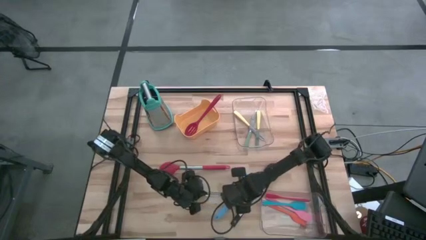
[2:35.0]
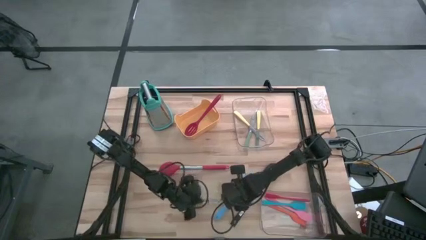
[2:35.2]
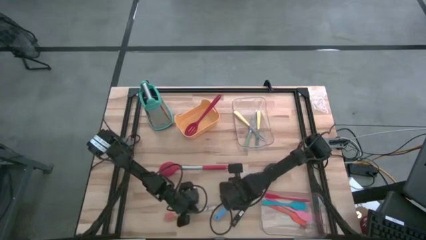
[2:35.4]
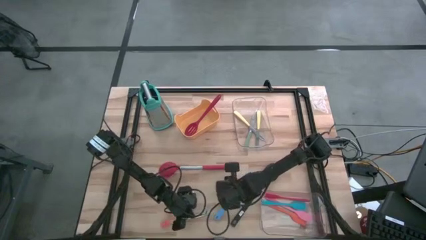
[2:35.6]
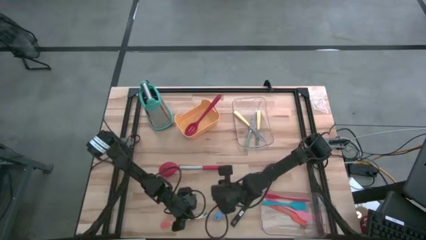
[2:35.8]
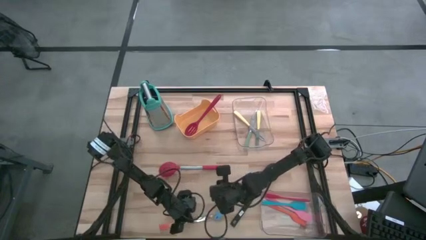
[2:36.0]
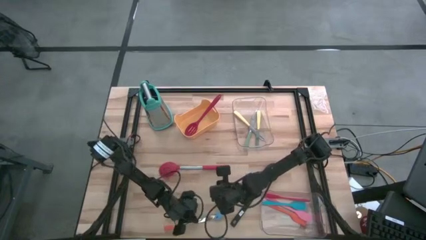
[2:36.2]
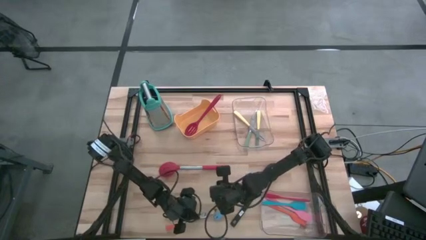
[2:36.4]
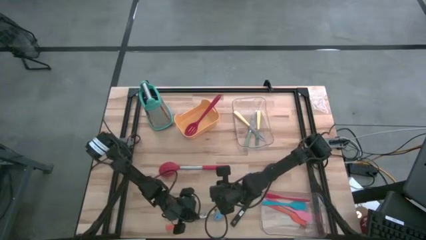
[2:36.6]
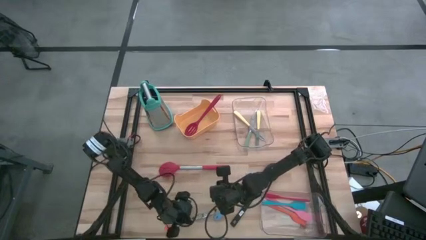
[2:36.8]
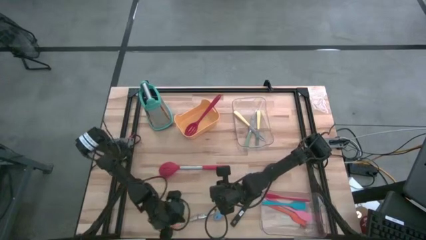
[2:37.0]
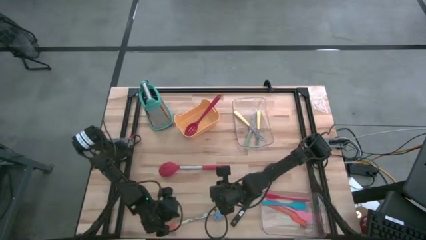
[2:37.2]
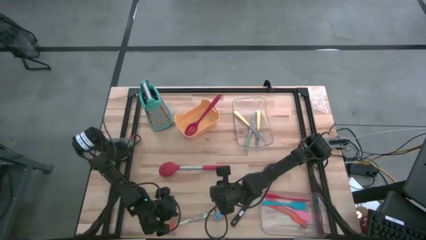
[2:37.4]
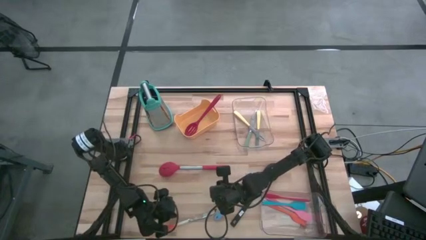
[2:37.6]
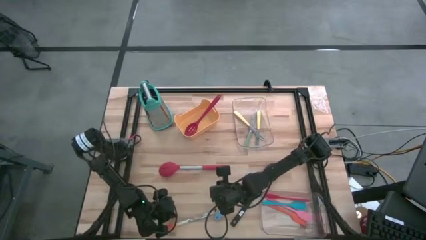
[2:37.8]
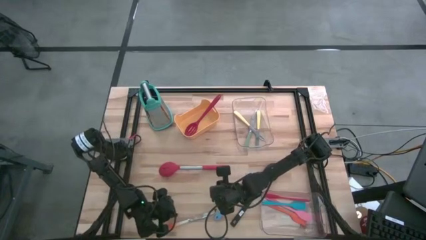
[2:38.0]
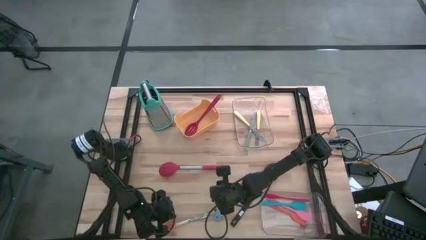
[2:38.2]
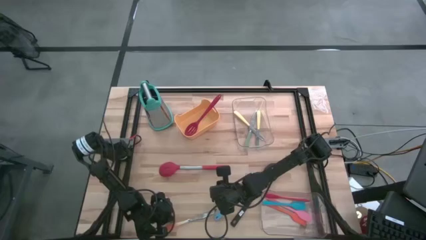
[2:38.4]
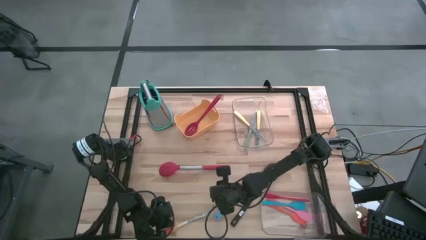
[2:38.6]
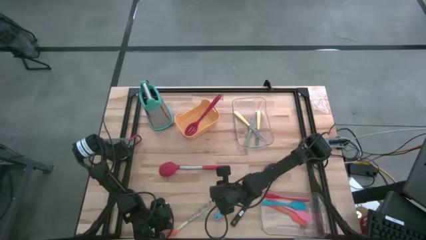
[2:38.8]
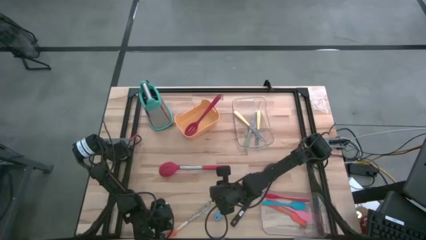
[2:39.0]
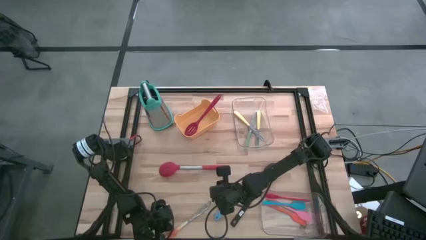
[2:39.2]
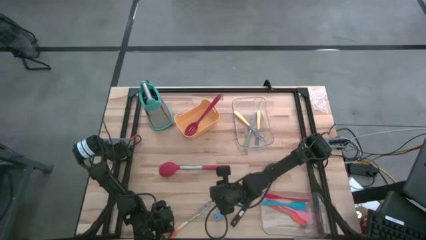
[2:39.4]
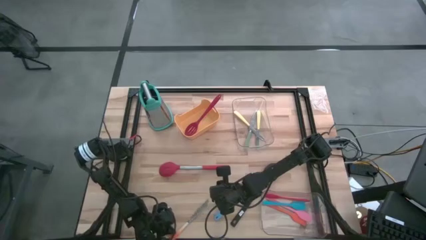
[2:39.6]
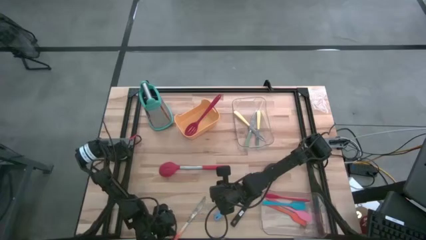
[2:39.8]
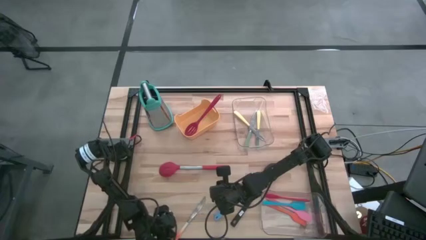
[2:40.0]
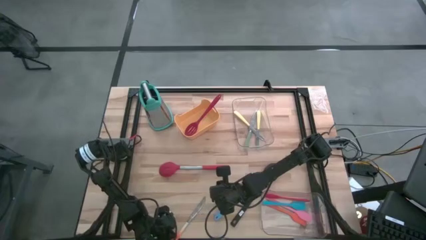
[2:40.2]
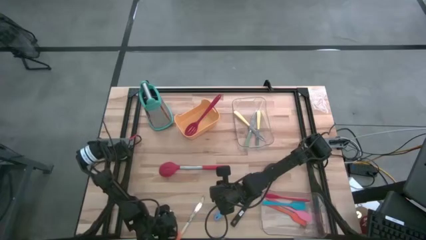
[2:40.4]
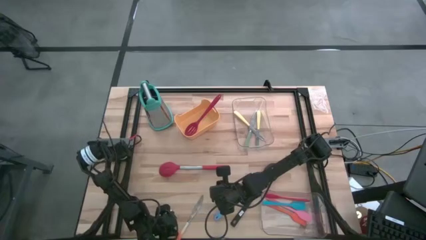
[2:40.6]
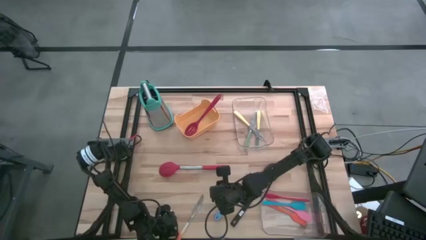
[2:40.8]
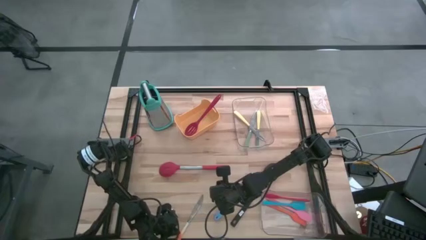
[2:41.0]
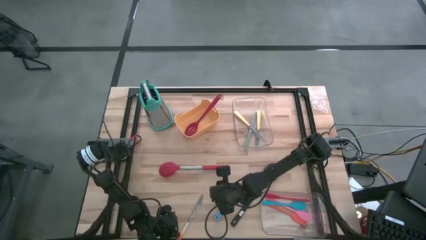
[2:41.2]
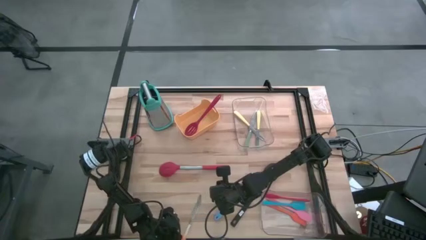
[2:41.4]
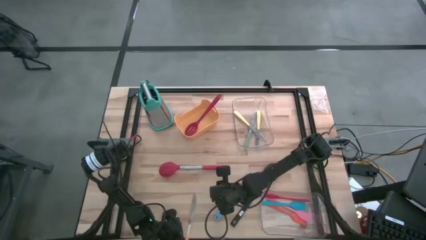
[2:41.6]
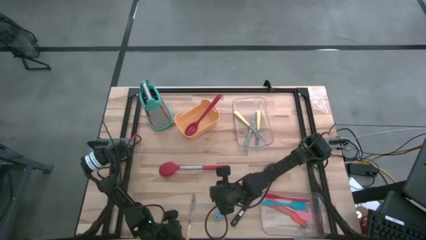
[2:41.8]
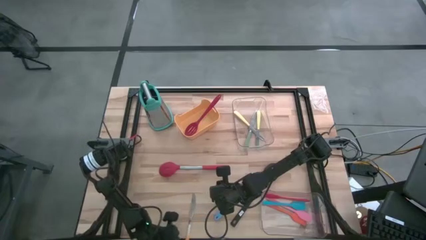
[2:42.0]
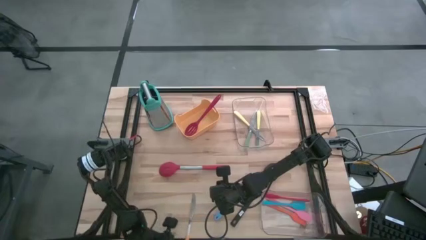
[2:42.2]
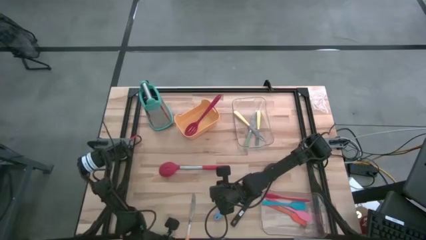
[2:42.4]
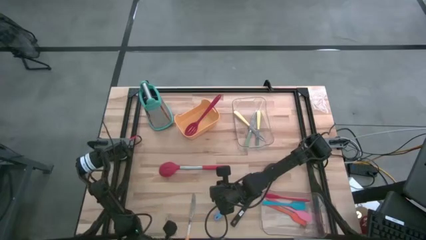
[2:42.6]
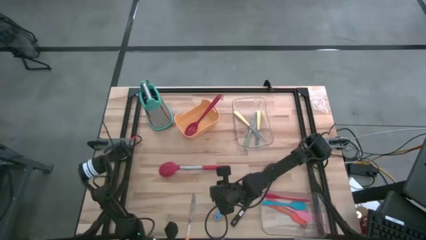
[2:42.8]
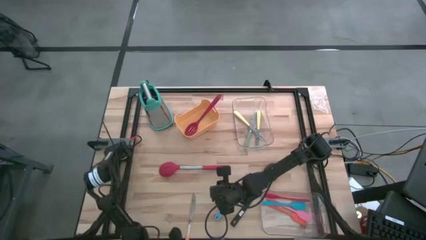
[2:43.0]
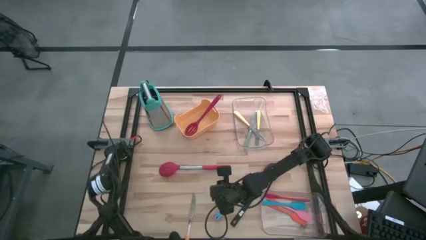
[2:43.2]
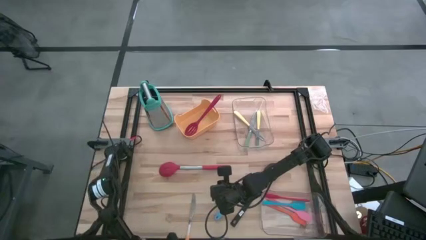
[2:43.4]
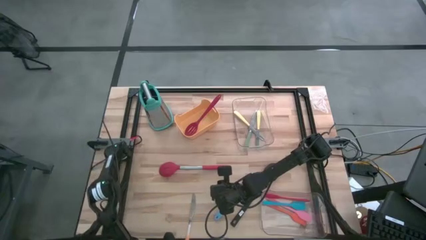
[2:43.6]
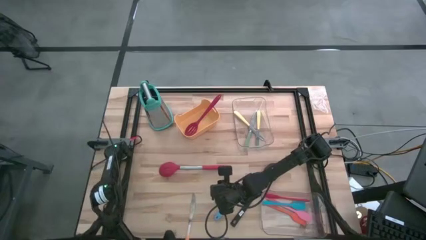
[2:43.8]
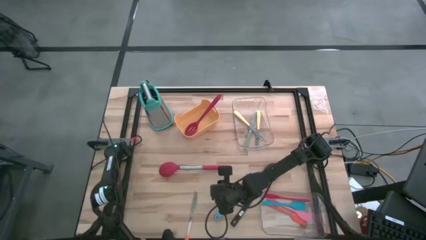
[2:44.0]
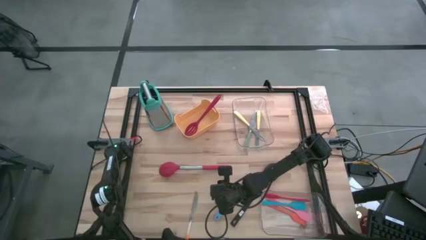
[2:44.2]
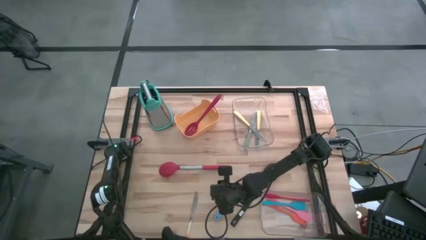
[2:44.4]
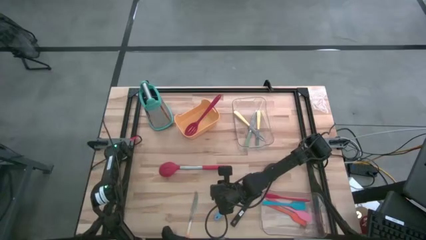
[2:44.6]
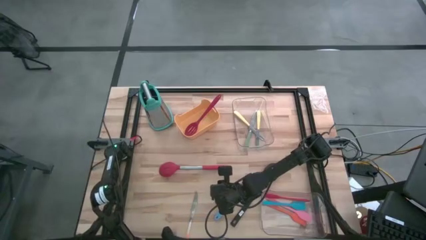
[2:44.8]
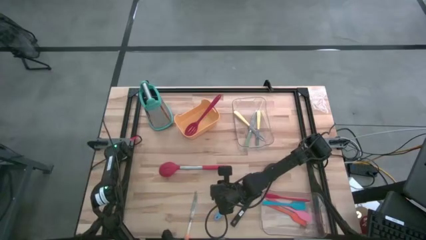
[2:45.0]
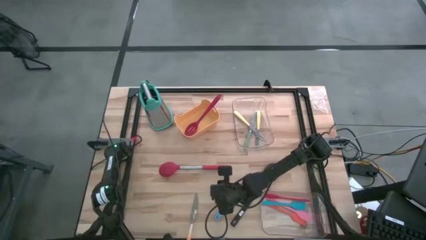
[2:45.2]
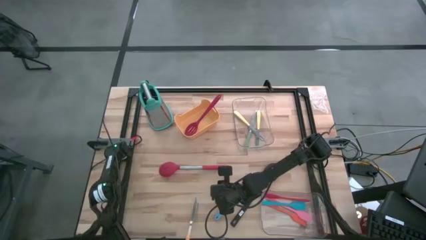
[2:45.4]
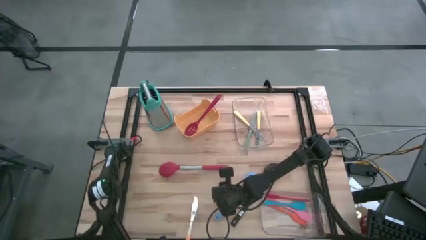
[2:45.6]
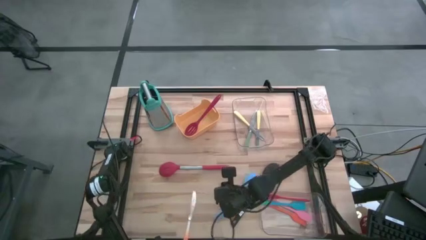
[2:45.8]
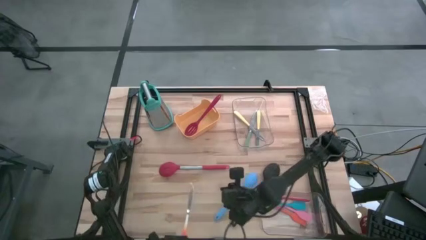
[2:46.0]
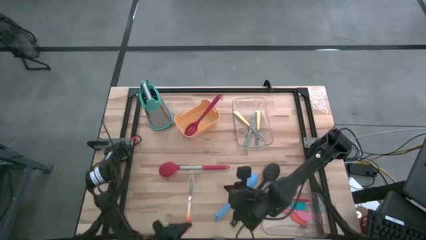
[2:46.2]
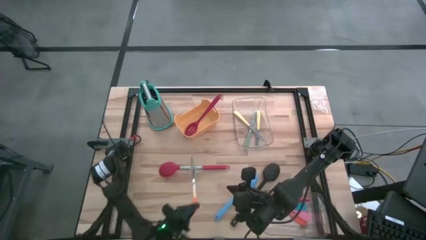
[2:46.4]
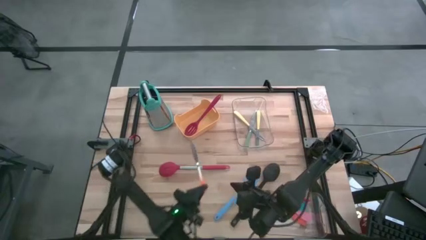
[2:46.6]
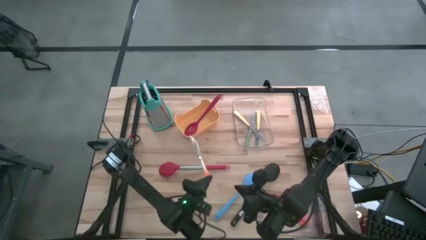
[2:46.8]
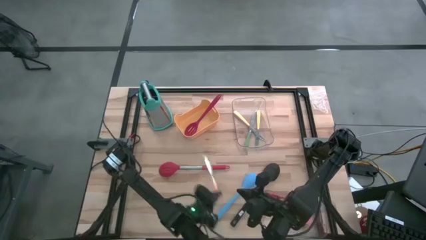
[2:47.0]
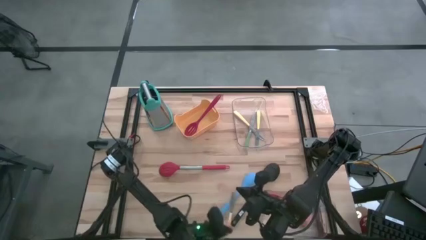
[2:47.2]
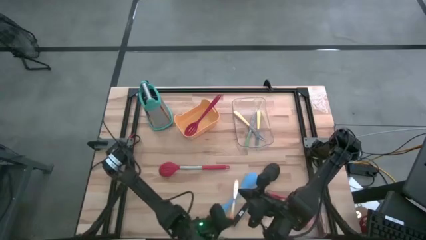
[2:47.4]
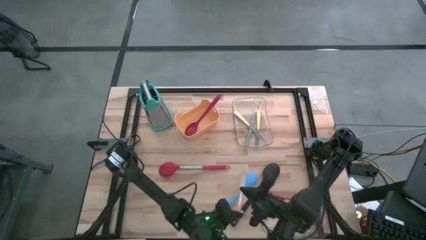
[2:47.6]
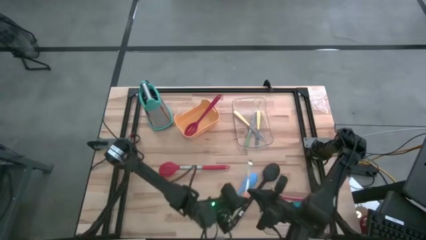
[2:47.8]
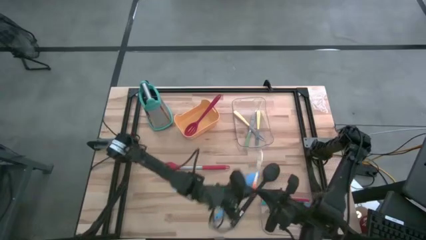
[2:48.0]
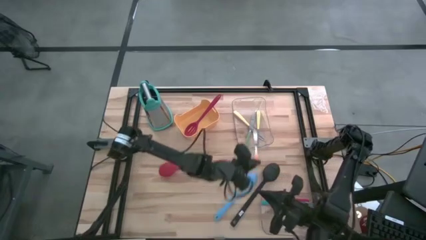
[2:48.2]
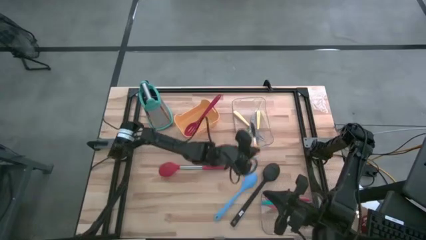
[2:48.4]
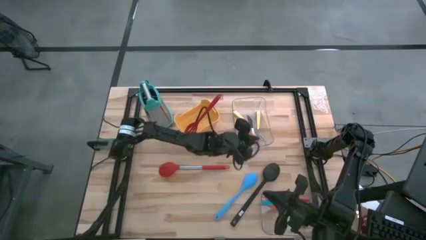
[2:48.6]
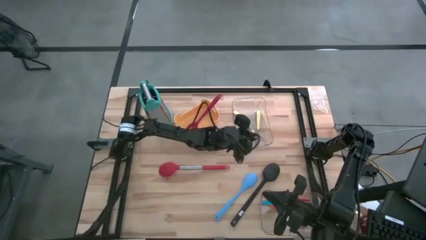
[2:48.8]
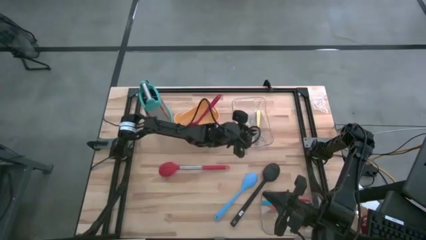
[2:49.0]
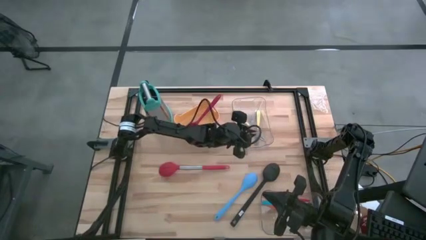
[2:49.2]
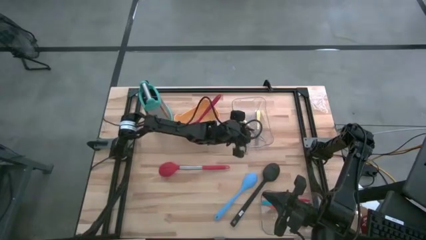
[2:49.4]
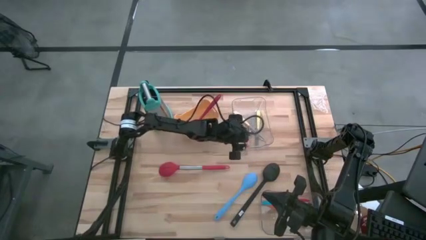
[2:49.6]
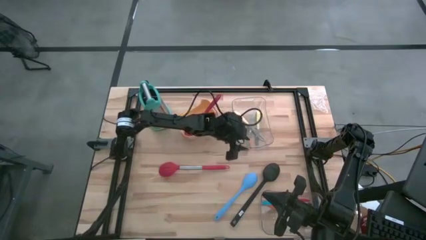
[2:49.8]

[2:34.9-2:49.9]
Task: Pick & Place Kitchen Items
Put the orange kitchen knife into the top transparent bin
